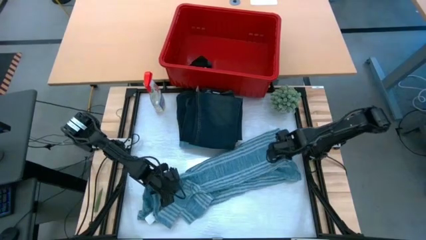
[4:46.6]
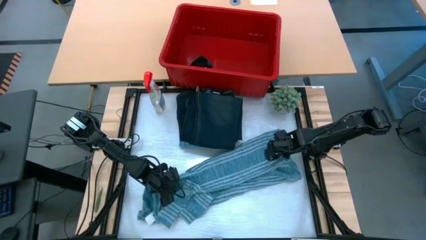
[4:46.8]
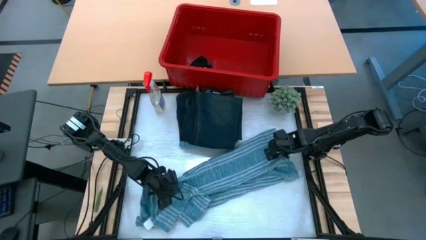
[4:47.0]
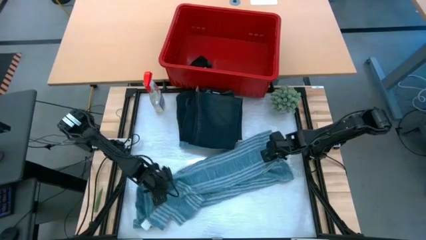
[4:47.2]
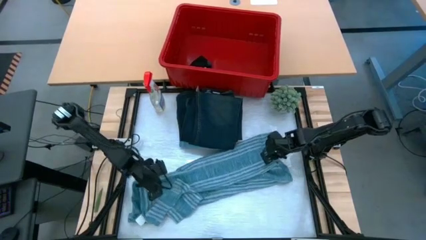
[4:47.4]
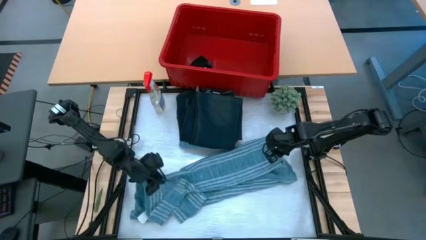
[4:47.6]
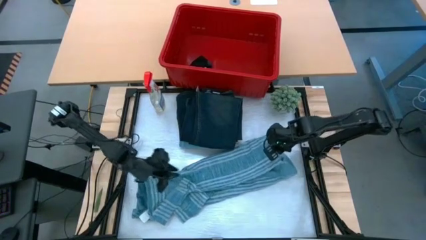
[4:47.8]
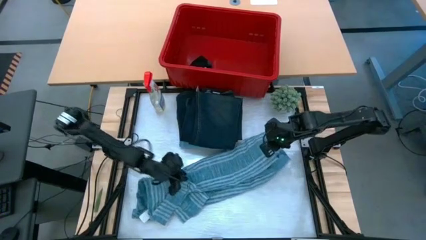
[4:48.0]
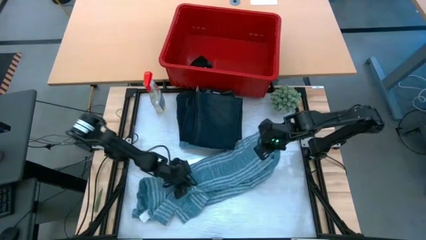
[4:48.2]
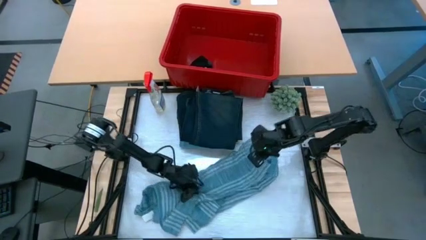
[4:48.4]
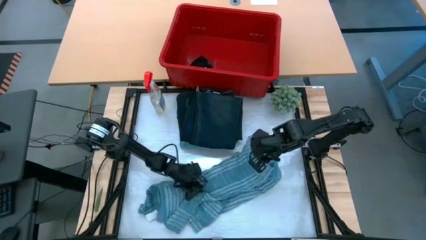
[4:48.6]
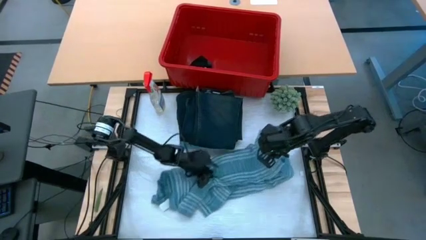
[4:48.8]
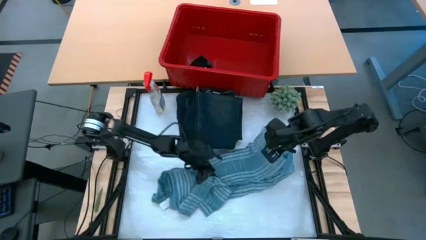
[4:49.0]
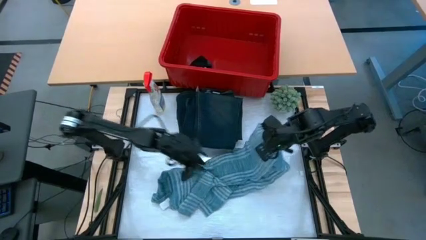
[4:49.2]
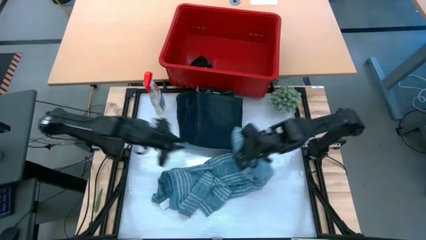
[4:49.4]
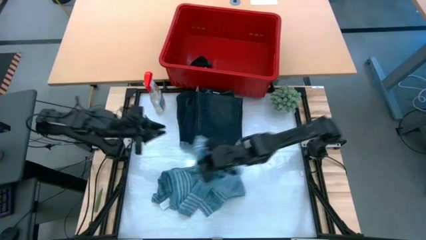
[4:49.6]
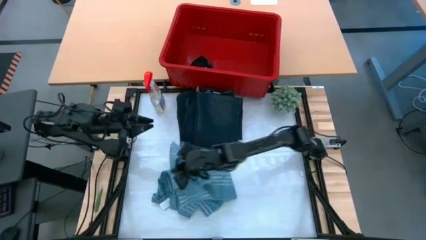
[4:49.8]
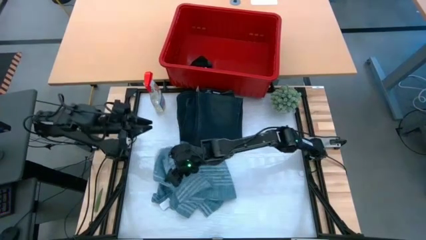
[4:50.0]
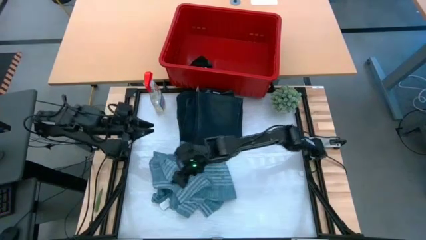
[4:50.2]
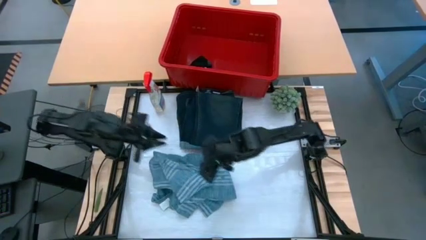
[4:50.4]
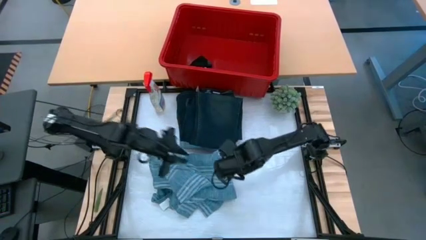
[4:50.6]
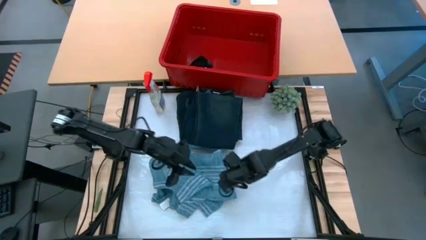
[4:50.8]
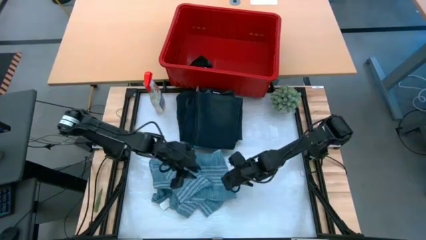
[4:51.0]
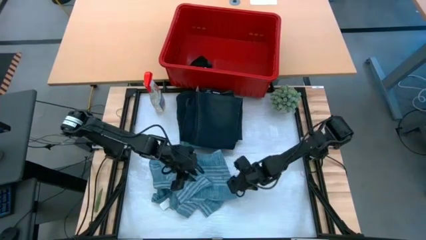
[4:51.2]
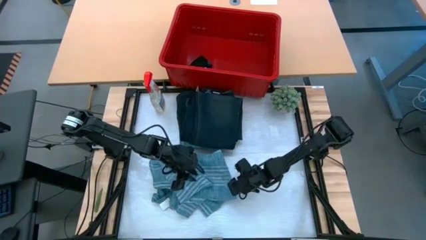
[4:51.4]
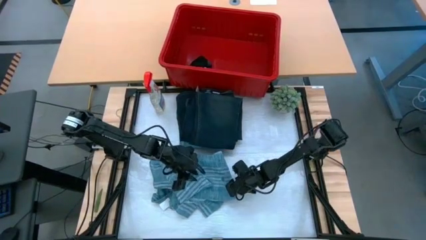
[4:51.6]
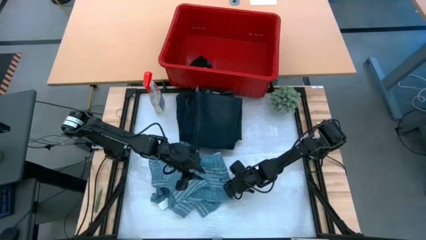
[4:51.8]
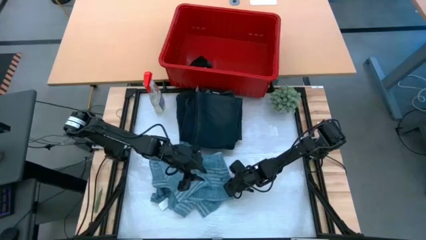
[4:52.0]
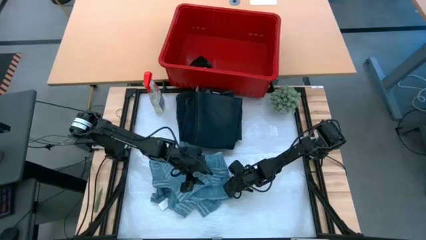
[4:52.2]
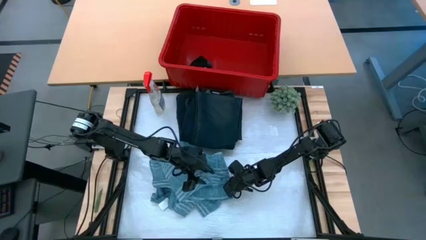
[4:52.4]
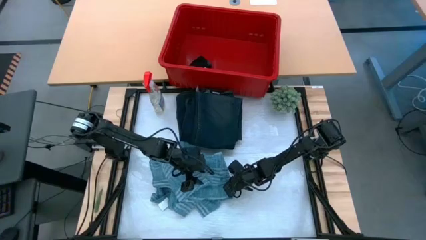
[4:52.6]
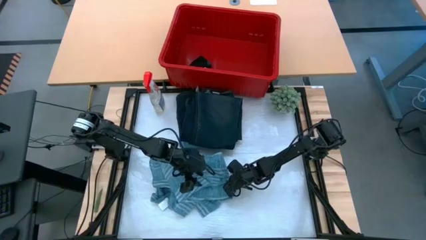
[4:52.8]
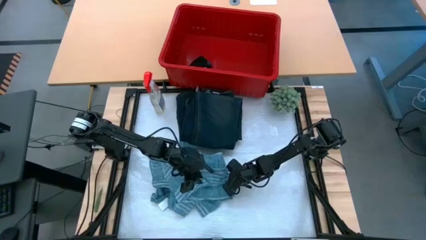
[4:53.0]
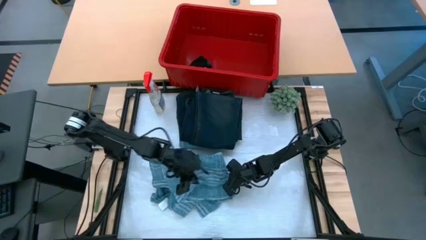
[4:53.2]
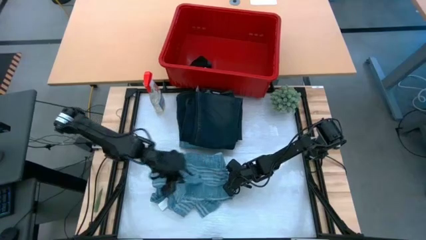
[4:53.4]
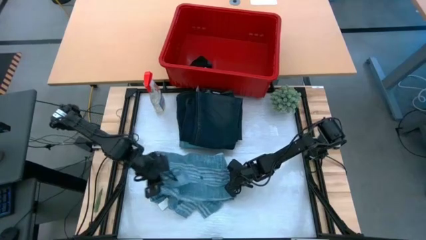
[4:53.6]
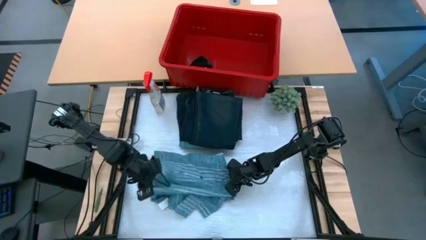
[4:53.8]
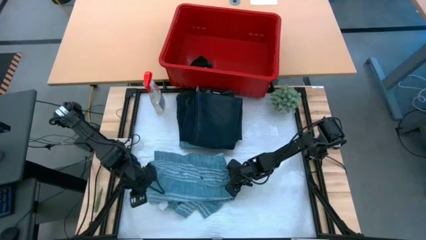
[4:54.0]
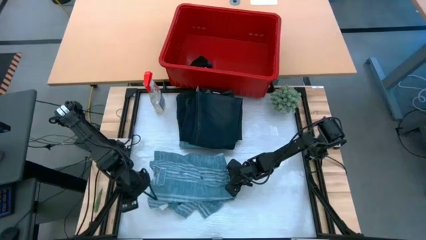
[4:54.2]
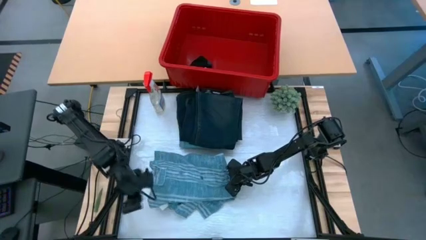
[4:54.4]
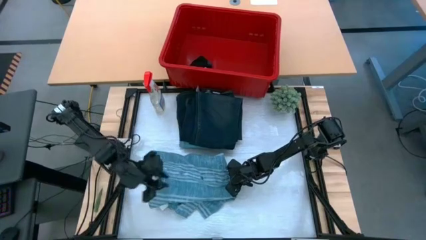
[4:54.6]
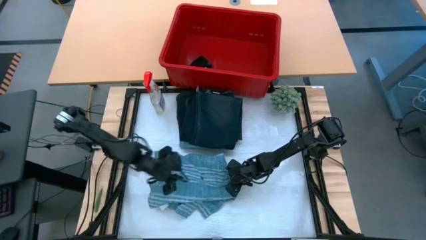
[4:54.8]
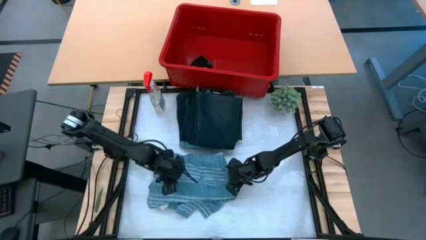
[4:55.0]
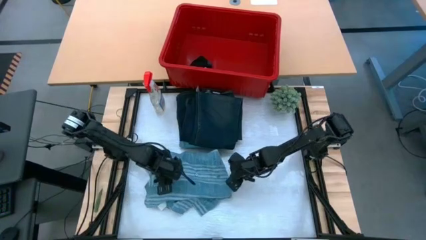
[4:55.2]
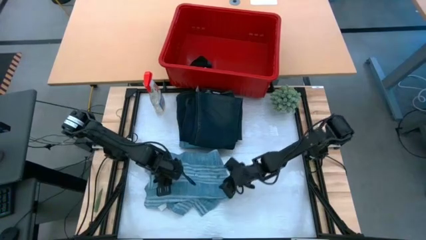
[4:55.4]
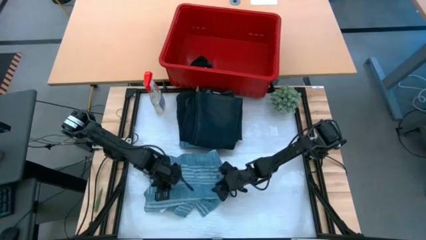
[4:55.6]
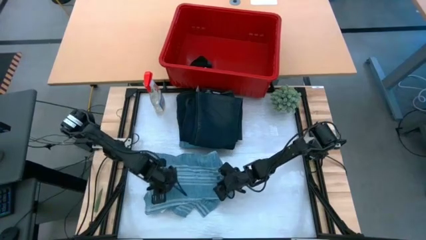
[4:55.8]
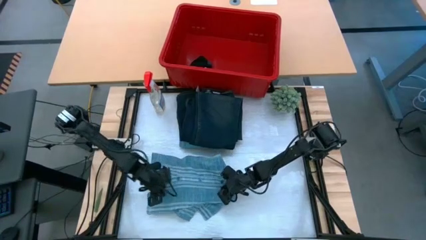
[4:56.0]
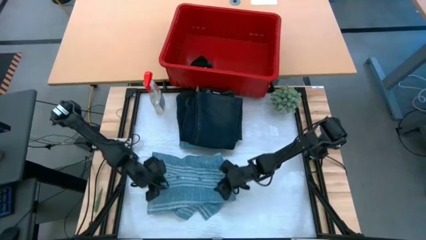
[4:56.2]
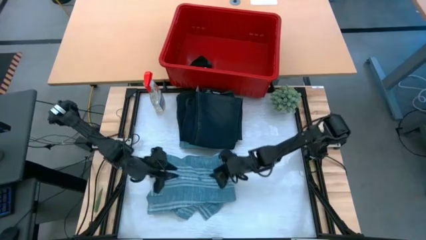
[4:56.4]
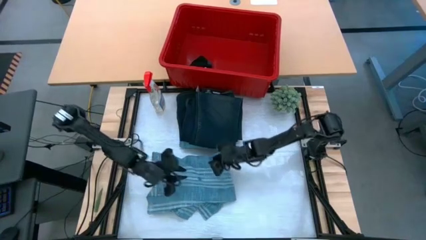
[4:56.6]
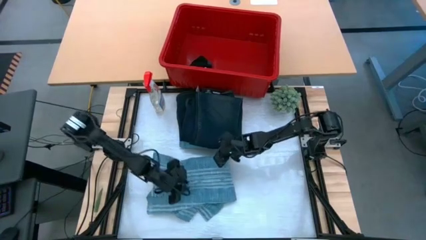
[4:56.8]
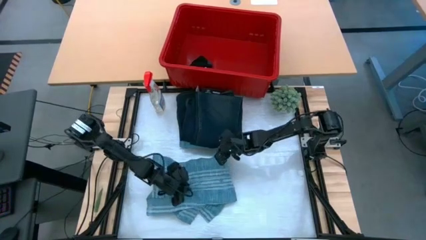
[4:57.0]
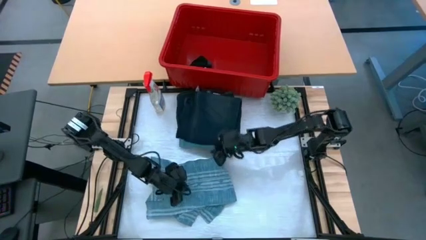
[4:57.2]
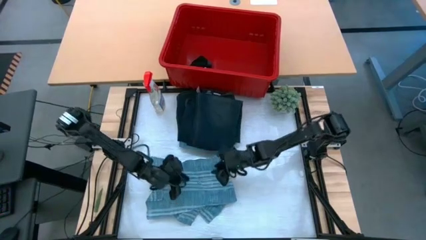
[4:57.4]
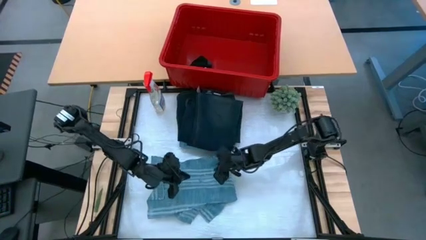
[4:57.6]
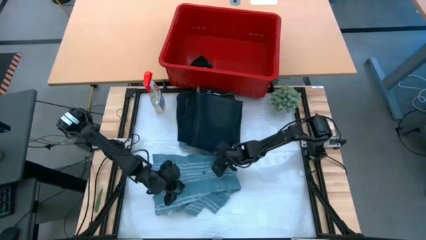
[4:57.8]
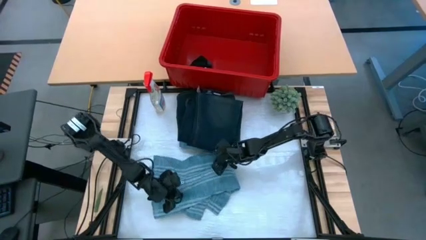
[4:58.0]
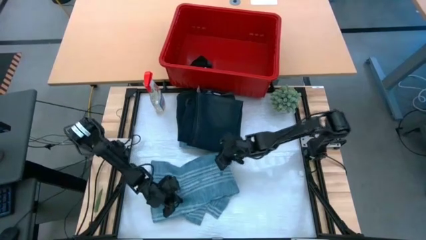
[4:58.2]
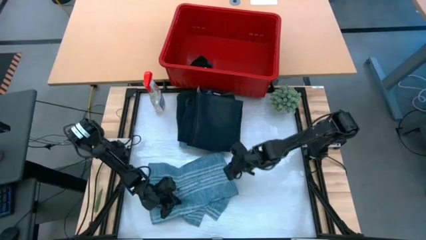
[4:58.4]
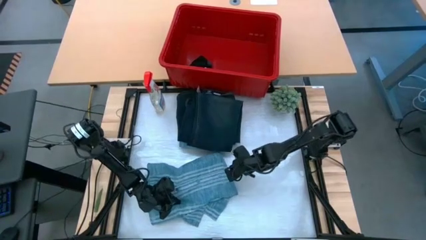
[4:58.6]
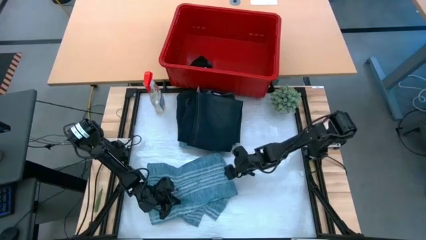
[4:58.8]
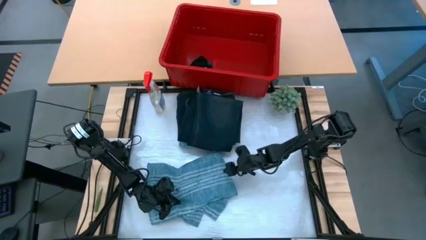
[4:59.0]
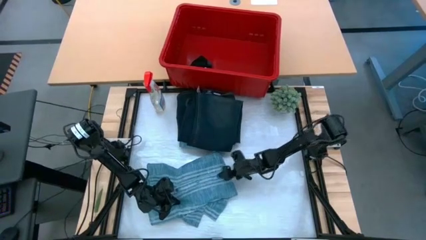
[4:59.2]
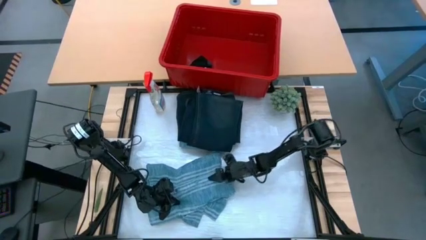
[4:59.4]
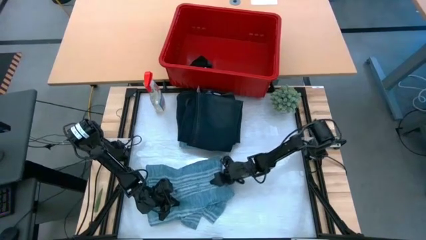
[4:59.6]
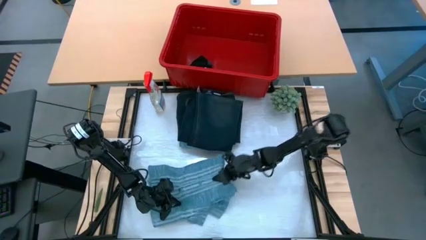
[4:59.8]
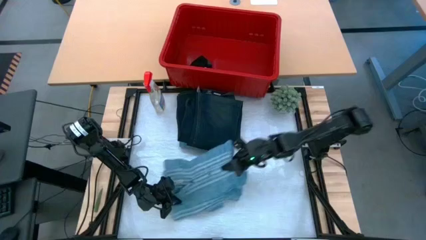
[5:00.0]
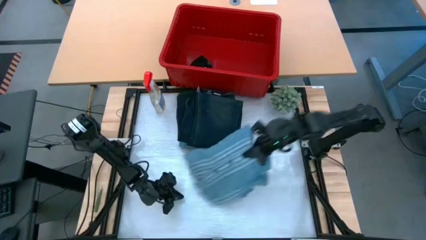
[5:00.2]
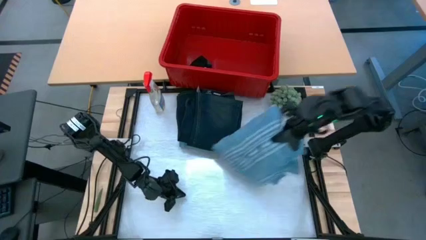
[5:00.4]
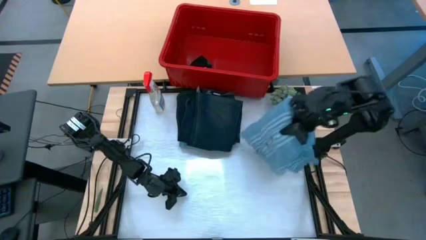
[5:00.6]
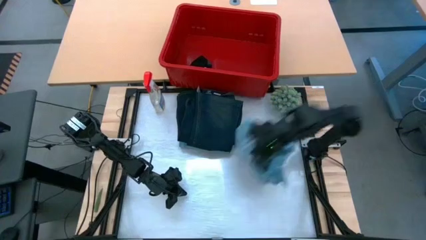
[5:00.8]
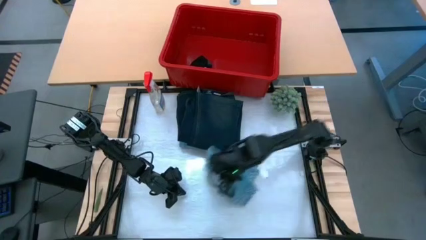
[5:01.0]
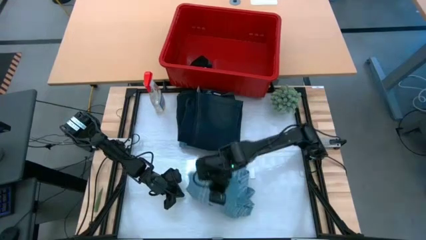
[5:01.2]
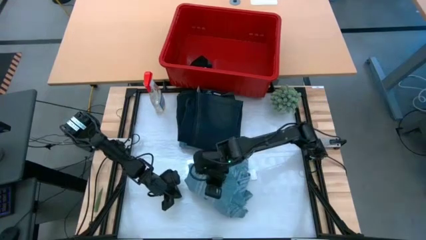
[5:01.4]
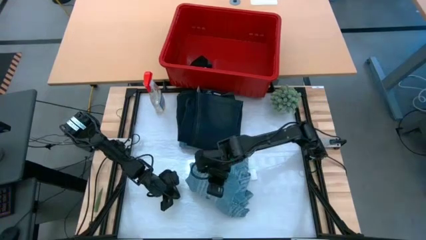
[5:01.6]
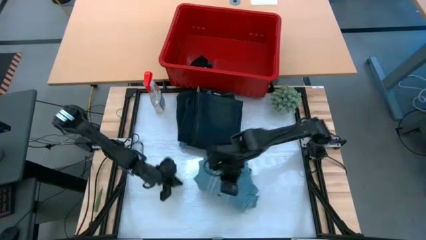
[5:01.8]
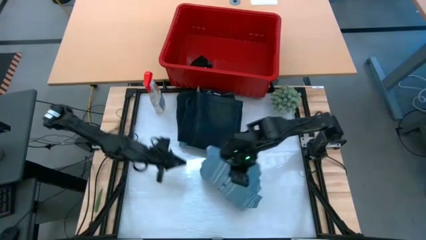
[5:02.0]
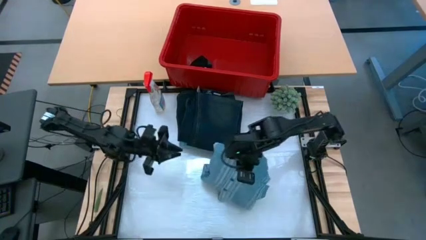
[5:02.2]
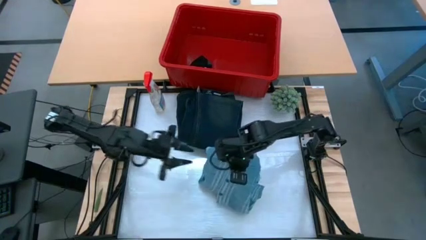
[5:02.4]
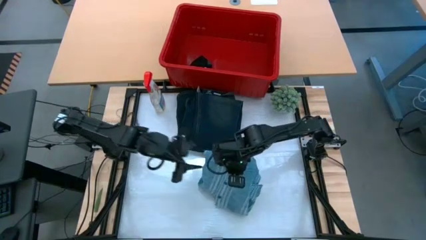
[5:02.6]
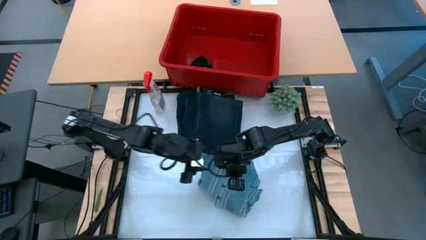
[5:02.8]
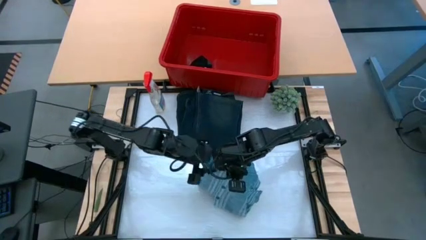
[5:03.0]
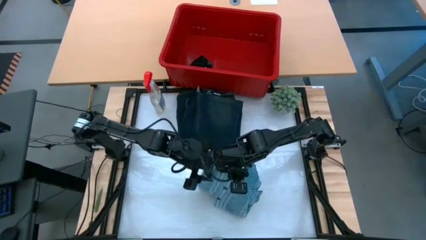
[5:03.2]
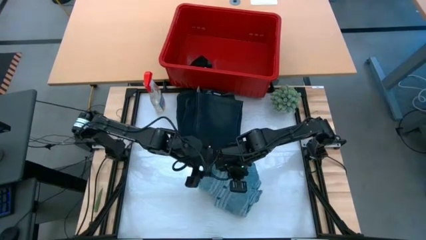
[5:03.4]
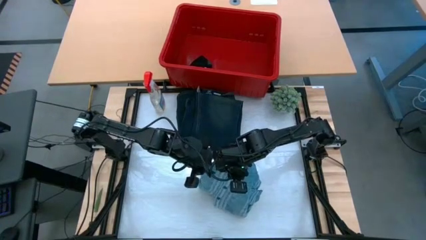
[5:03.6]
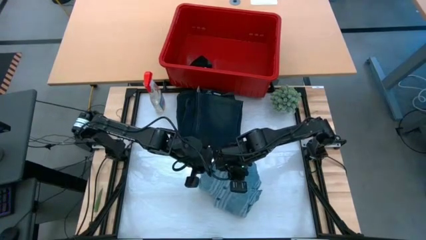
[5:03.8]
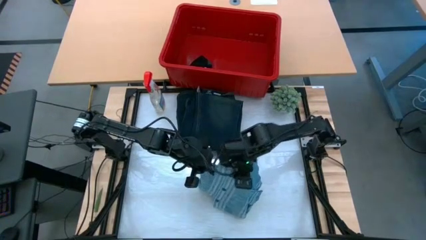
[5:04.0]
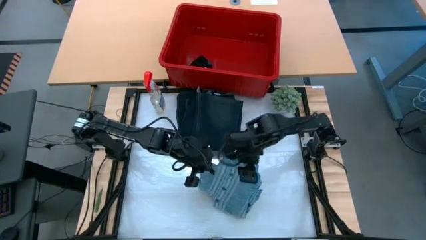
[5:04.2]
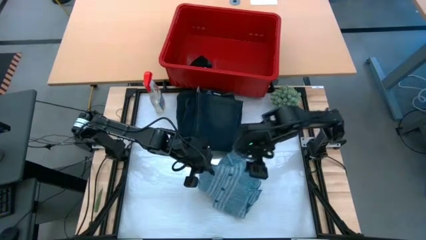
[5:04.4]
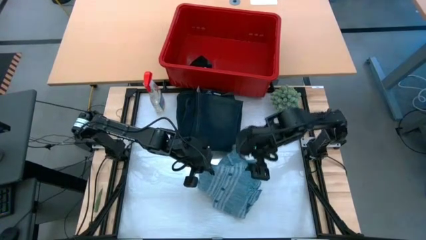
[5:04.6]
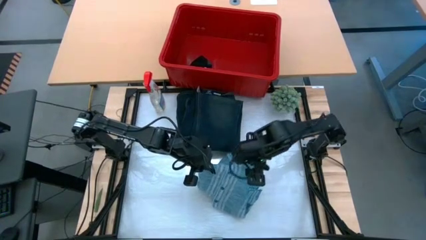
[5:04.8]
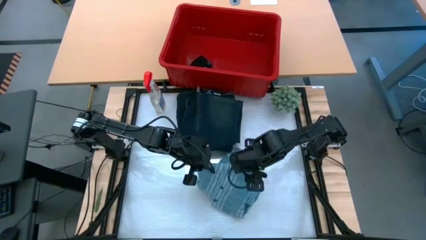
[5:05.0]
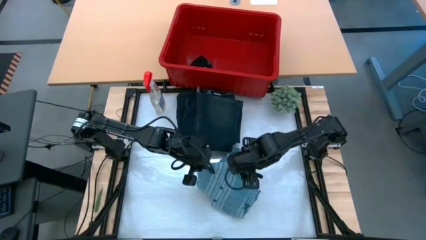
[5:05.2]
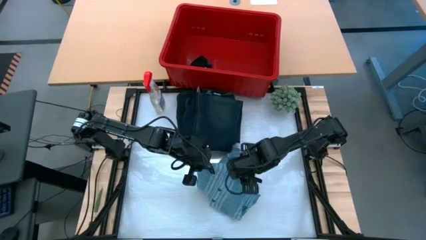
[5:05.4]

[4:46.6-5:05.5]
Task: Fold Laundry from Bin
Fold the blue long sleeve on the table
